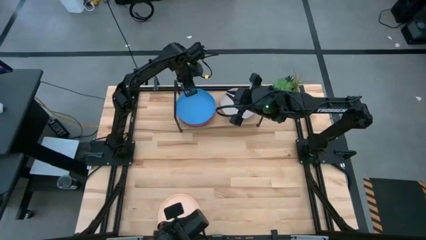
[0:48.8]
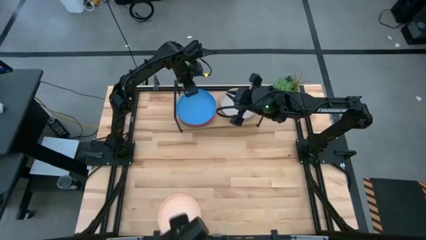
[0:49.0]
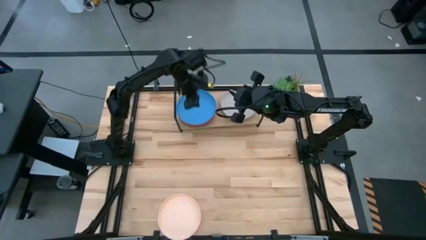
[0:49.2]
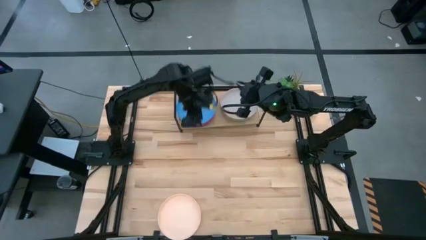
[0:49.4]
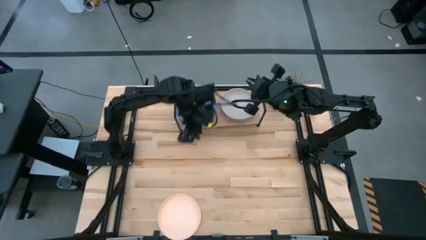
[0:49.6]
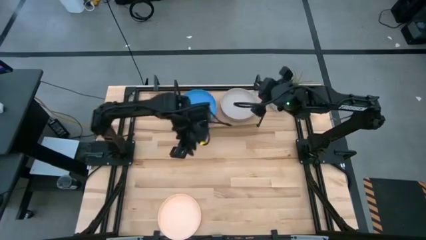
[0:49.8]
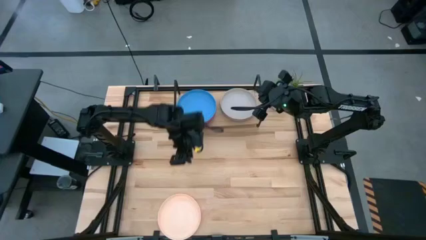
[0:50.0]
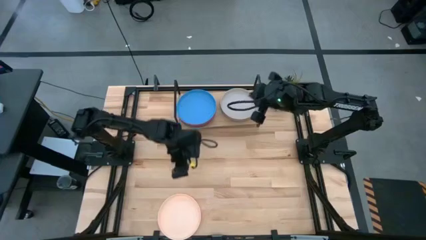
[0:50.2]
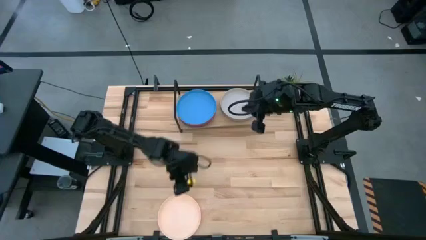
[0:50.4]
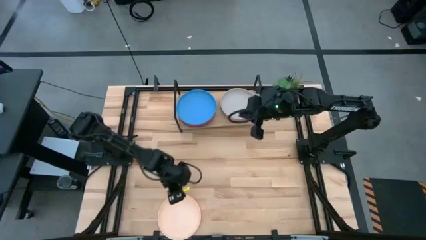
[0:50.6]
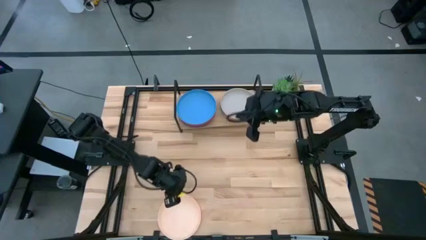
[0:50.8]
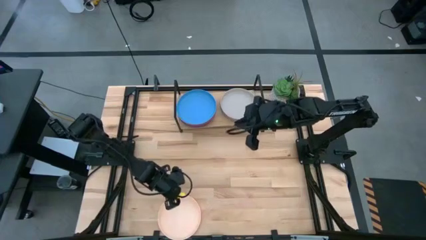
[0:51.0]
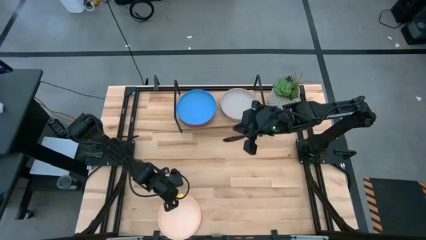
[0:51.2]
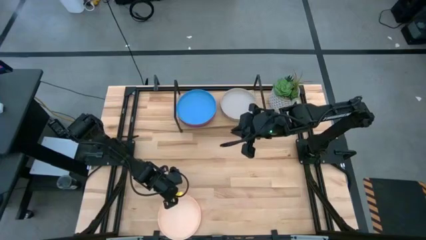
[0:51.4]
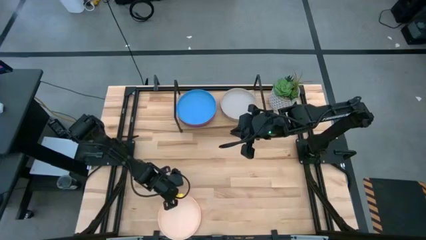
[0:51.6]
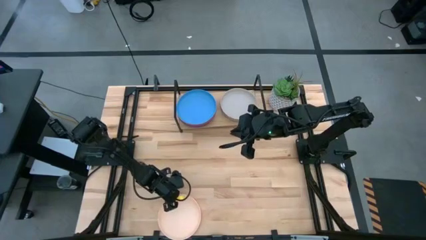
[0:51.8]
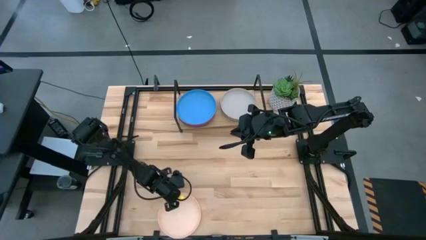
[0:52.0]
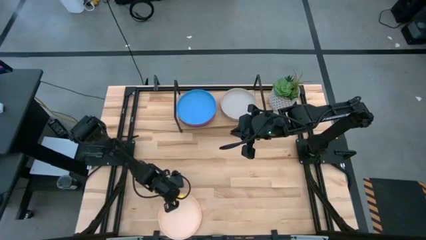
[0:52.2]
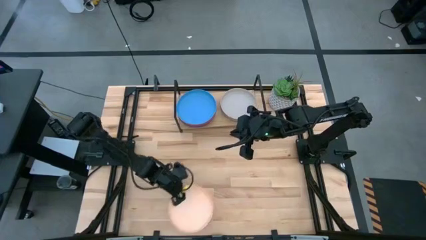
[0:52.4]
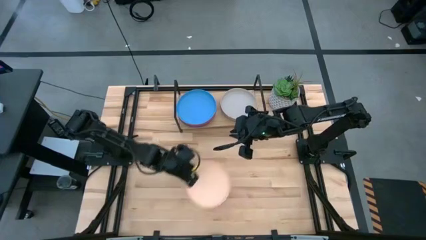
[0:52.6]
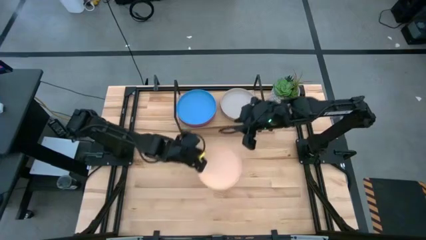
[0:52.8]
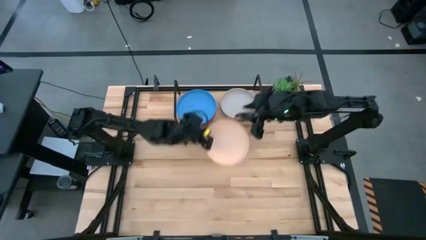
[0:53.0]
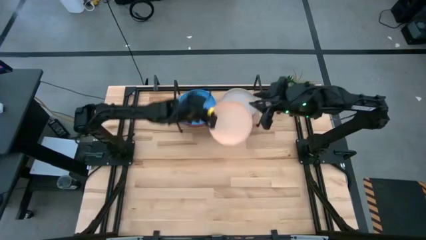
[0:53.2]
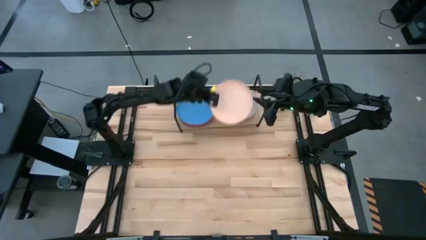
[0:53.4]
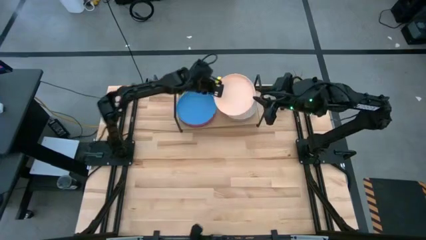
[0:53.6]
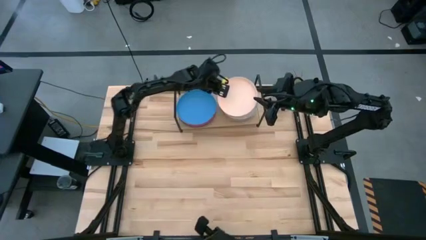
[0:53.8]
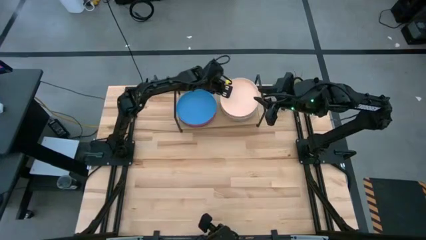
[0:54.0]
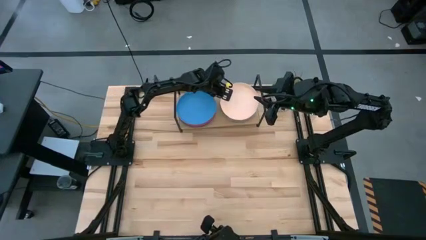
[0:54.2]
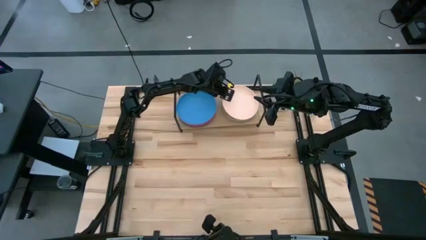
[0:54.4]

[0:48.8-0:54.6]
Task: Place and stack plates onto a shelf
Stack the light brown plate on top of the gray plate on the shelf

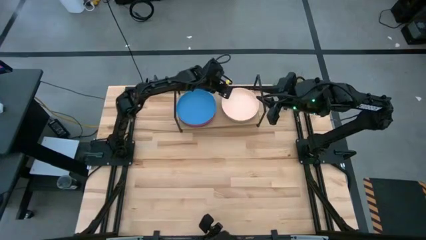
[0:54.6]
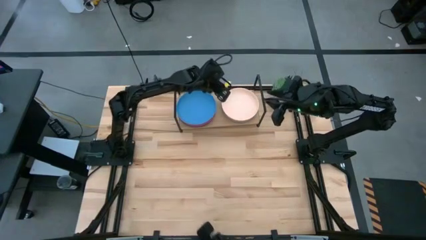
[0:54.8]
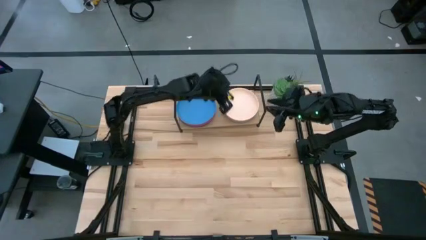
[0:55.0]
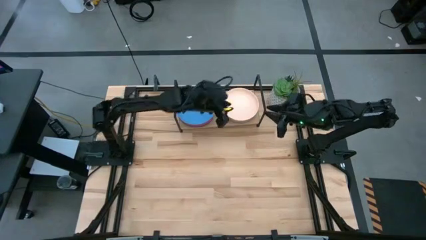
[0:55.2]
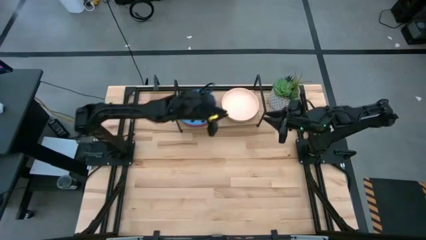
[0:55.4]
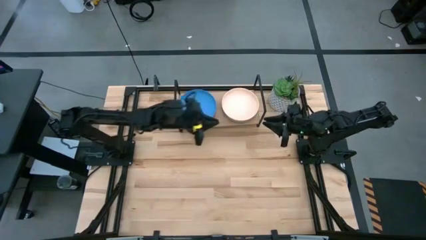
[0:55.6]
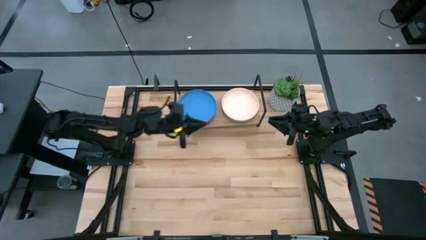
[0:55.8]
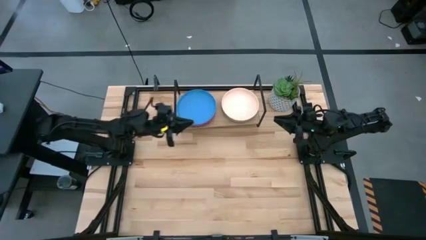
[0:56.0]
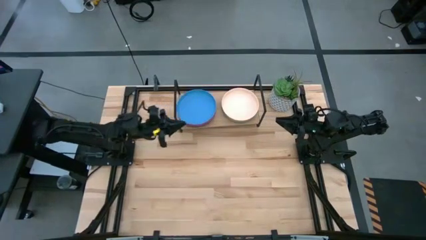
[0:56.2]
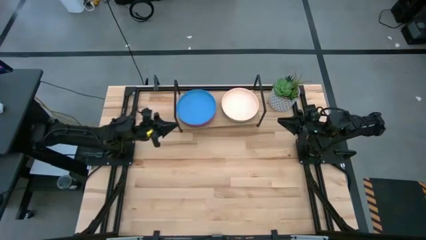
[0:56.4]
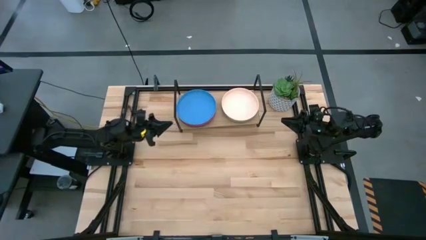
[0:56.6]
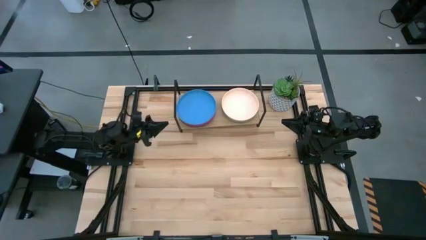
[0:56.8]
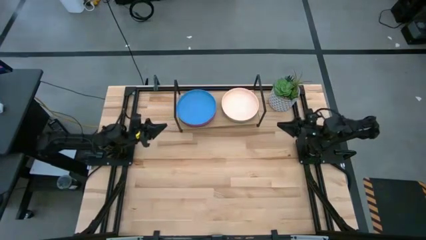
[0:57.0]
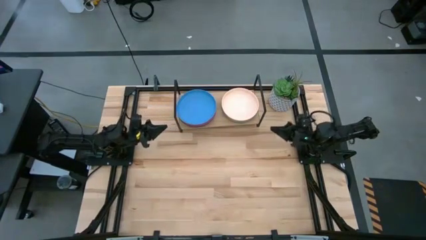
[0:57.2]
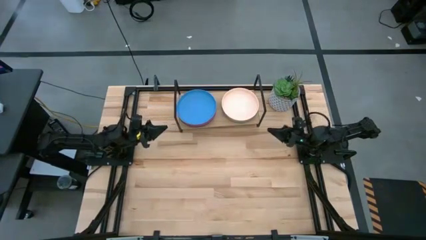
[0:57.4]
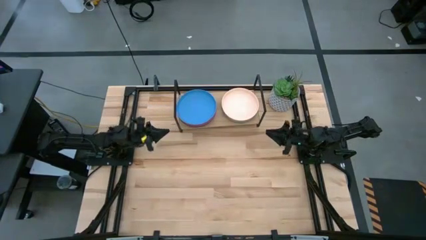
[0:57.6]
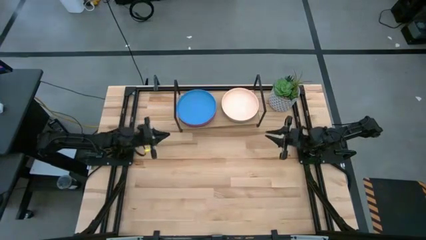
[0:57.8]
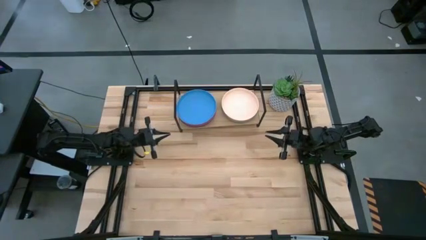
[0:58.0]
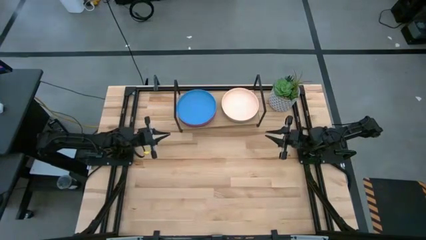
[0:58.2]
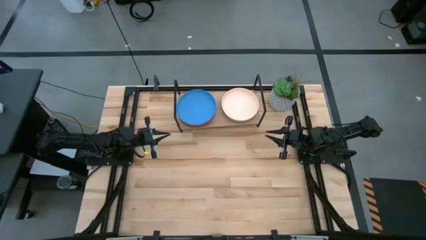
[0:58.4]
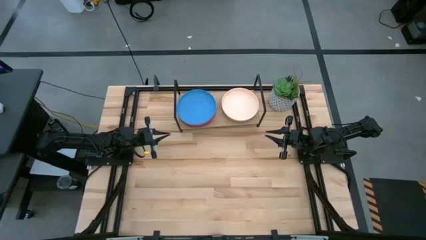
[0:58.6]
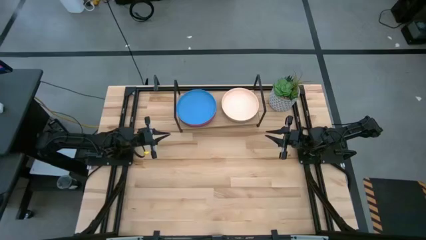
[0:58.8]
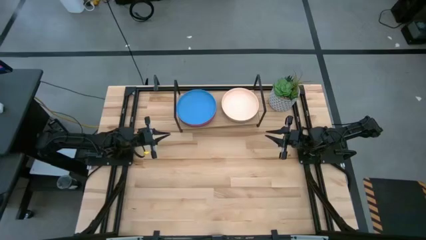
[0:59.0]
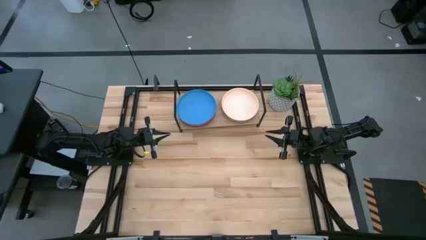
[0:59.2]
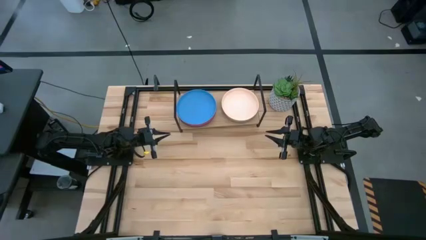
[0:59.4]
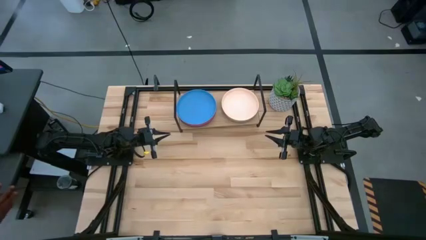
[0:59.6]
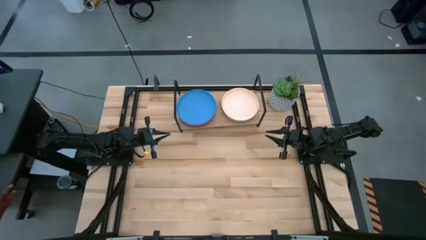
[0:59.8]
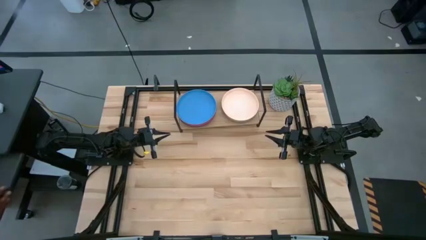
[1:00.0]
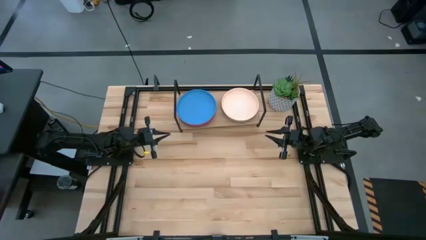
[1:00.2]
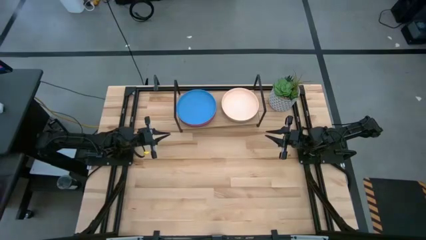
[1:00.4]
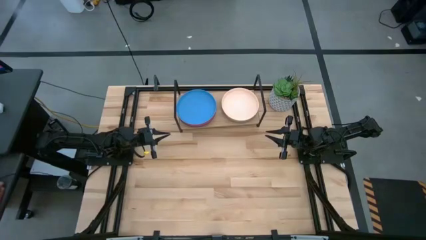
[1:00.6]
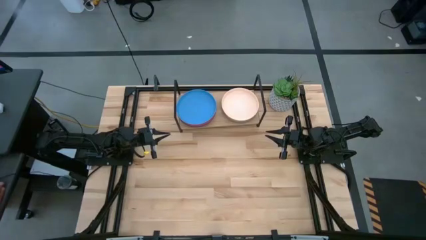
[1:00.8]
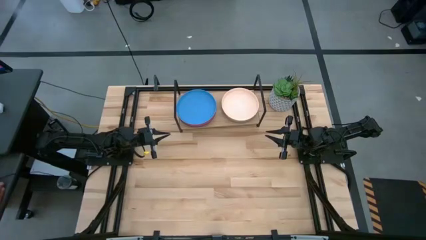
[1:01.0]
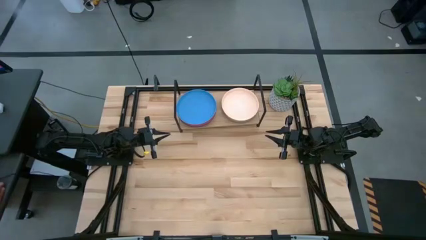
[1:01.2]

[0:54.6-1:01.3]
Return to Home Position

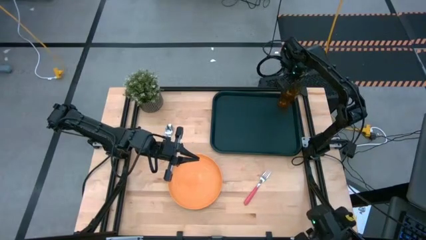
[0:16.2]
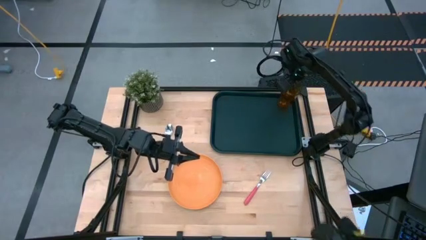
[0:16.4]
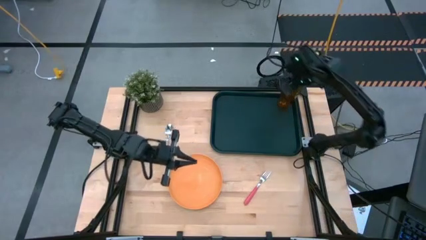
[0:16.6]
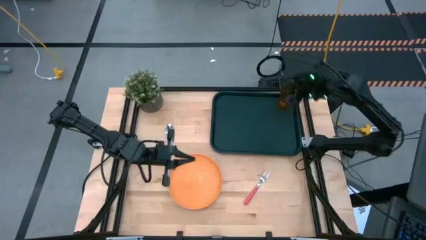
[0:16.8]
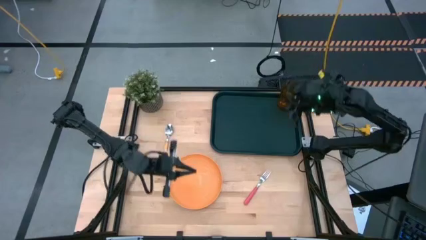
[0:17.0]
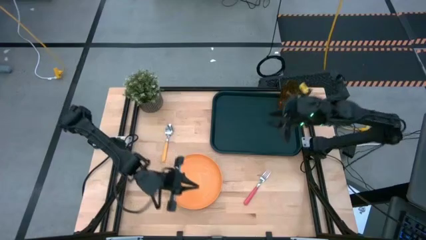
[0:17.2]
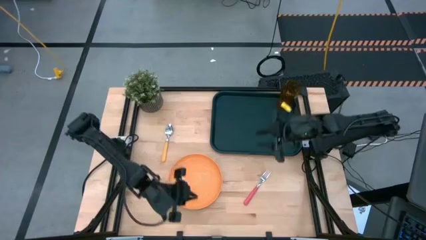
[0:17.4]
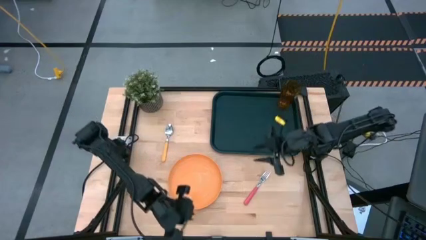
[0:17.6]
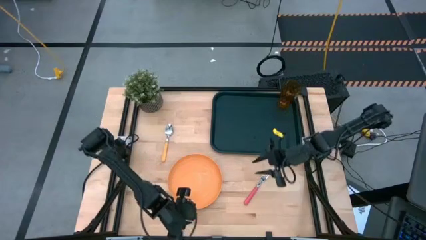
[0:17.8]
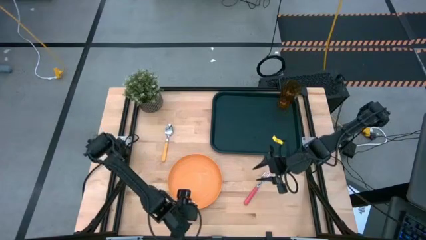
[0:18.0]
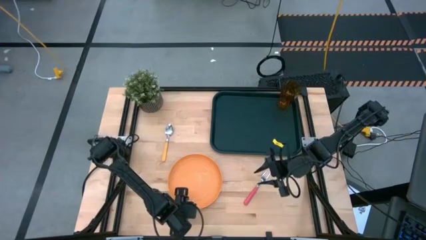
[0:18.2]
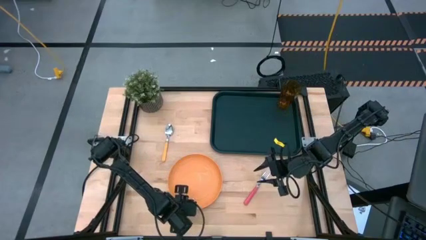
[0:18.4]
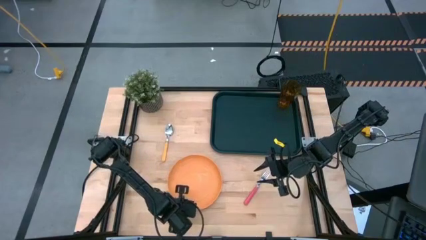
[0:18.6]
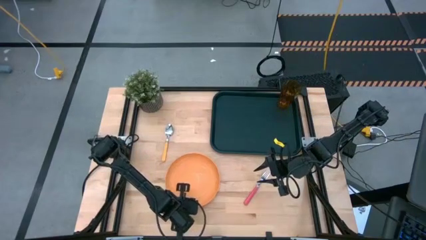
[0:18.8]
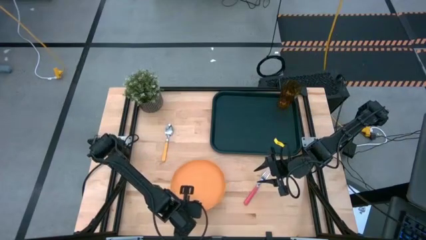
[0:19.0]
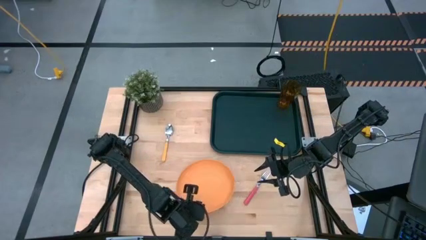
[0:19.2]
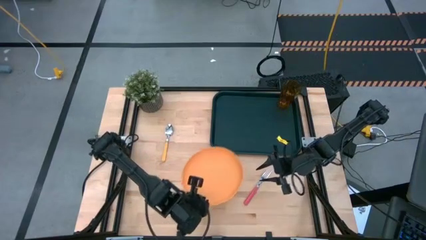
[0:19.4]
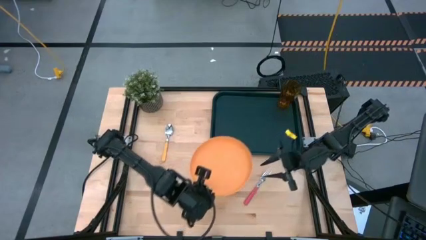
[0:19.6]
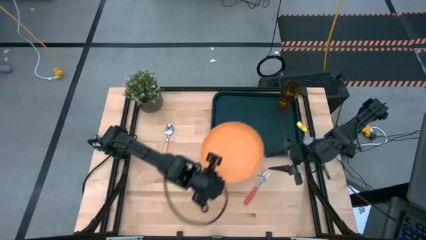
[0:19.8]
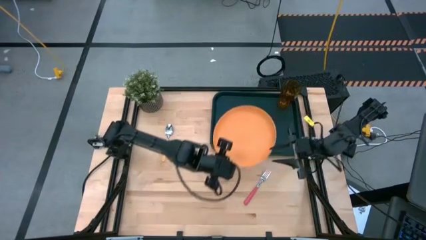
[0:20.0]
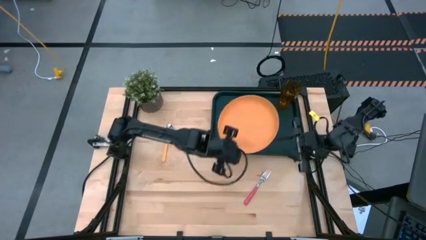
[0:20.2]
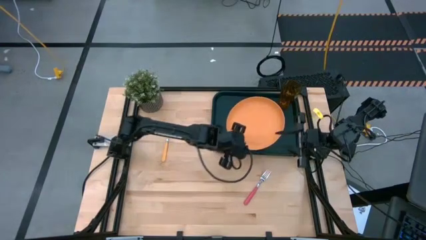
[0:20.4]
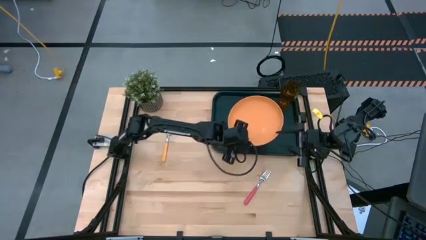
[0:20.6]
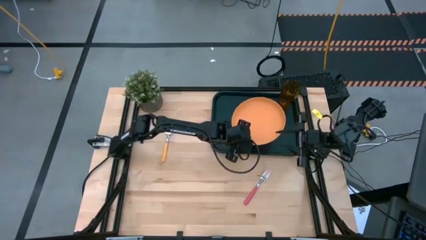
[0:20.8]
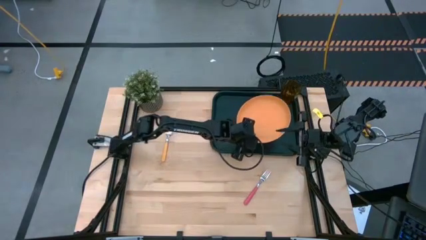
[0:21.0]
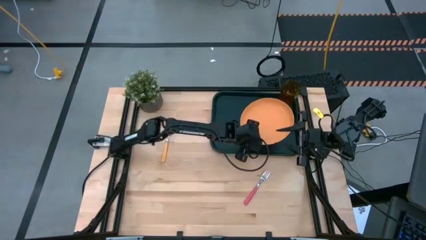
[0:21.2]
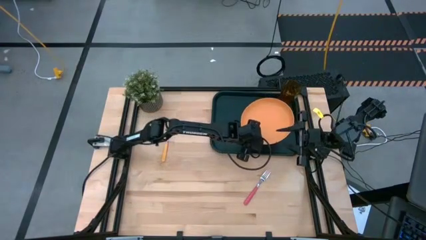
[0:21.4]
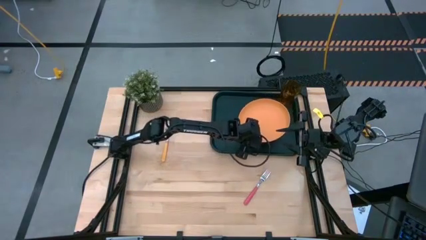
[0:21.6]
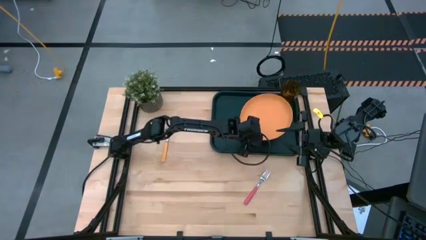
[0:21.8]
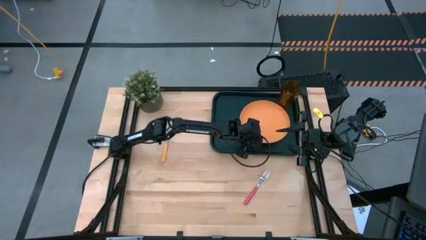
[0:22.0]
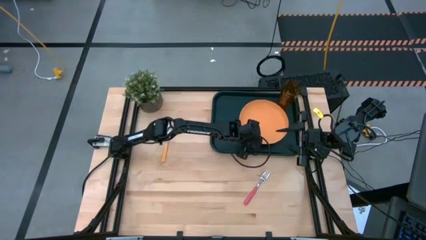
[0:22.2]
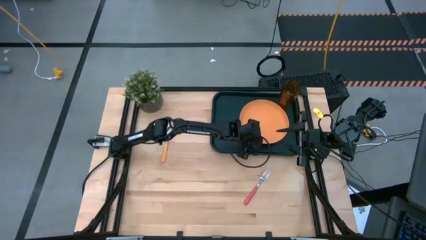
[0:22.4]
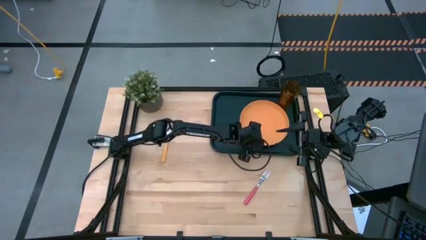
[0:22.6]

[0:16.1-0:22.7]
Task: Pick and place plate/cup/fork/spoon on tray
Put the orange plate on the bottom left of the brown cup
